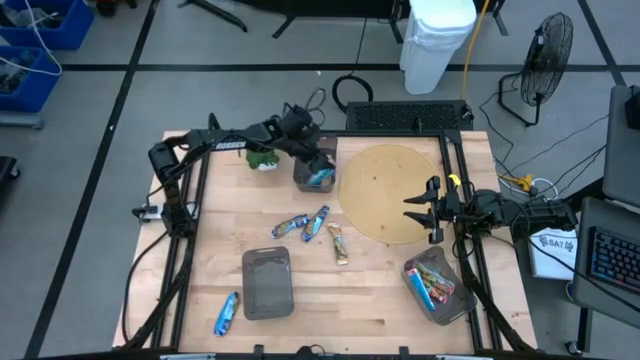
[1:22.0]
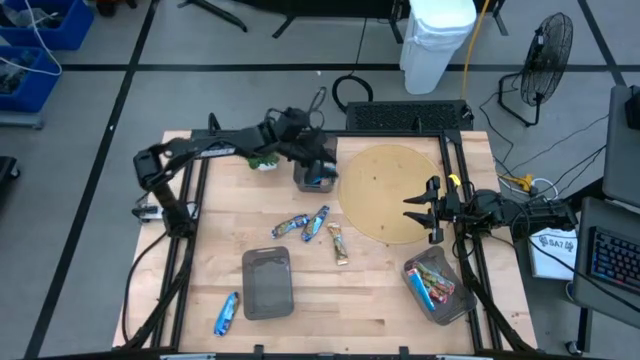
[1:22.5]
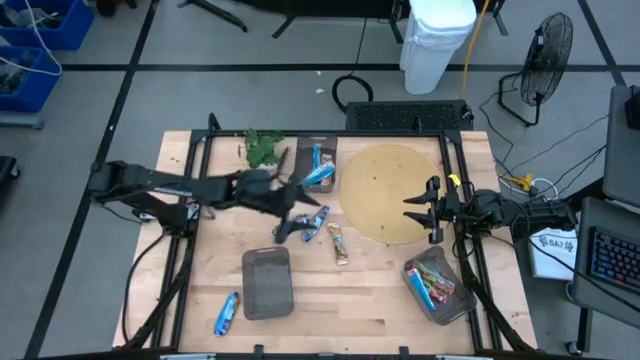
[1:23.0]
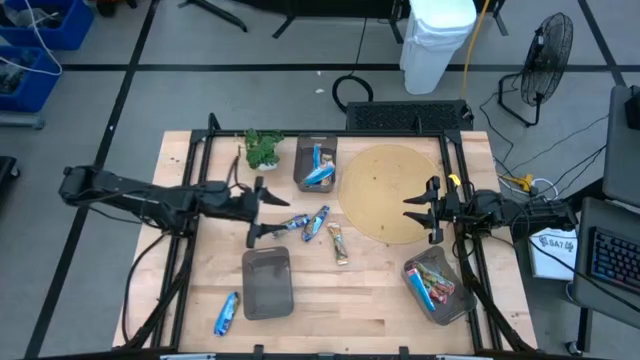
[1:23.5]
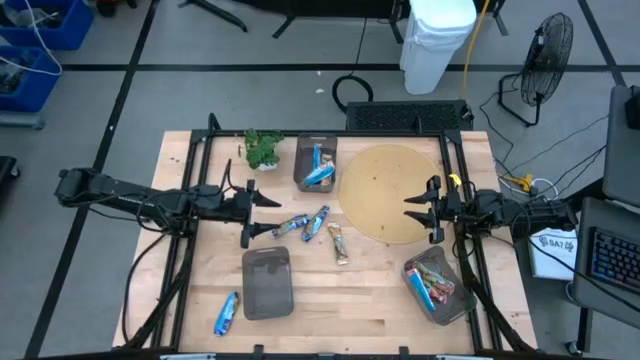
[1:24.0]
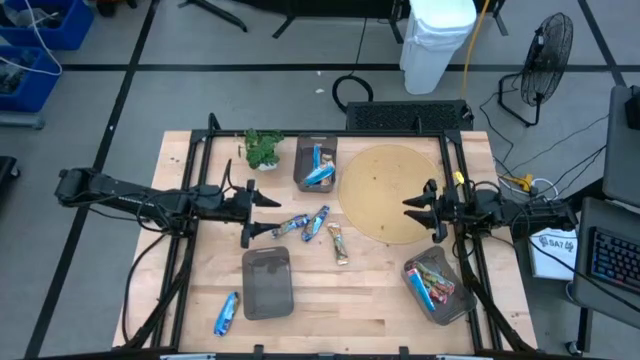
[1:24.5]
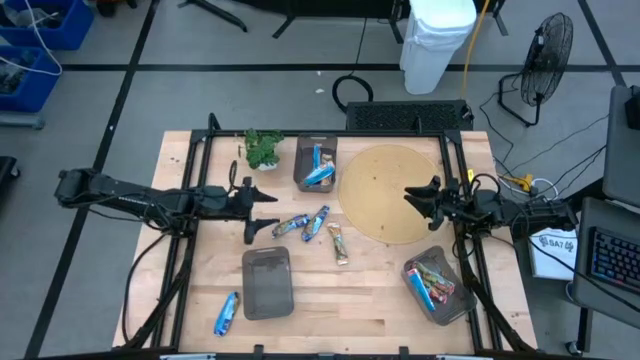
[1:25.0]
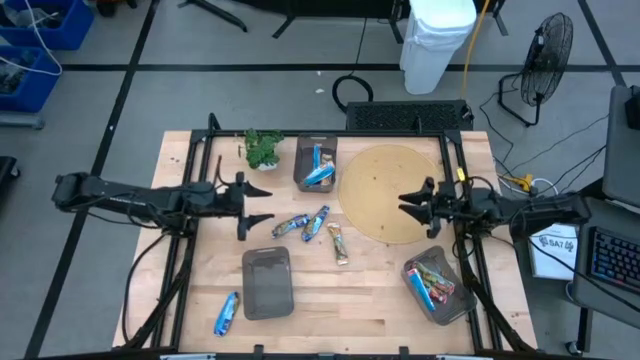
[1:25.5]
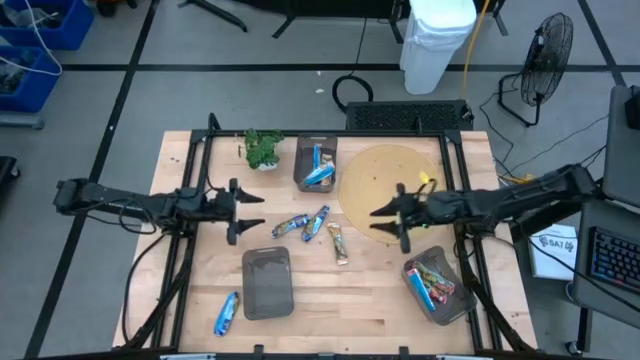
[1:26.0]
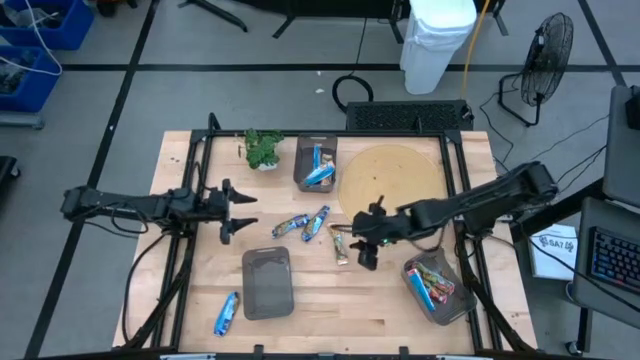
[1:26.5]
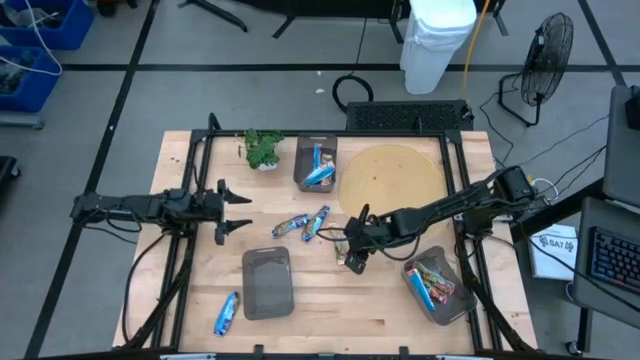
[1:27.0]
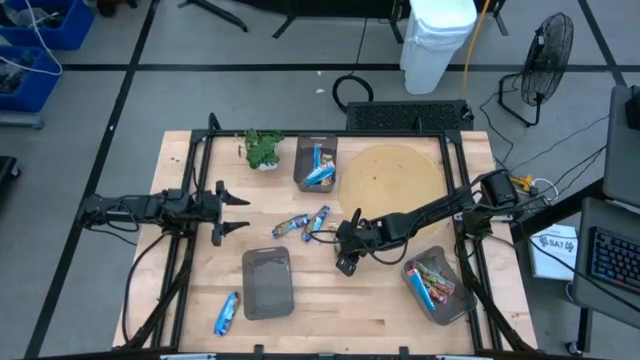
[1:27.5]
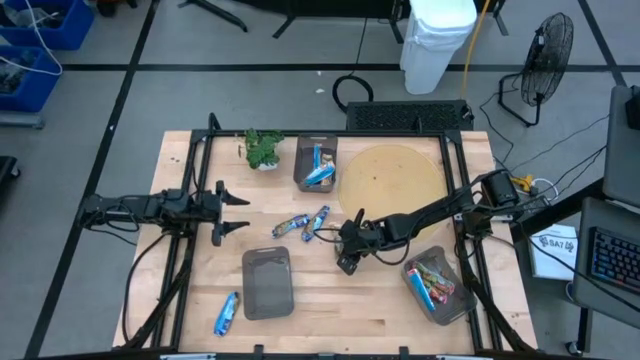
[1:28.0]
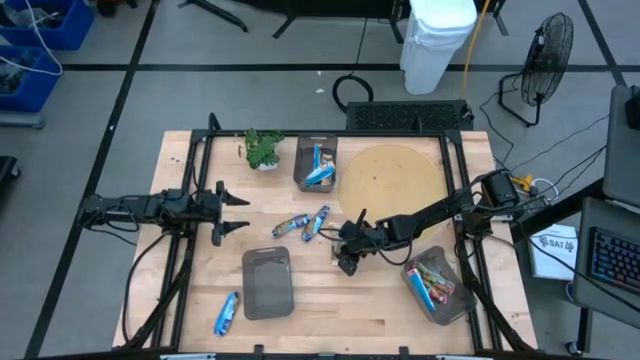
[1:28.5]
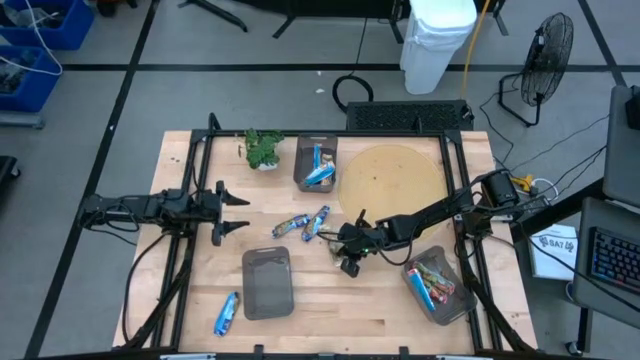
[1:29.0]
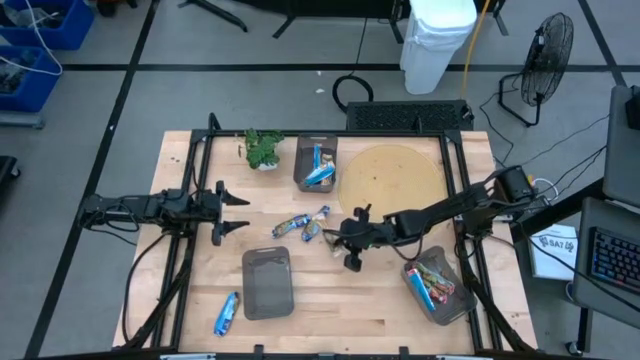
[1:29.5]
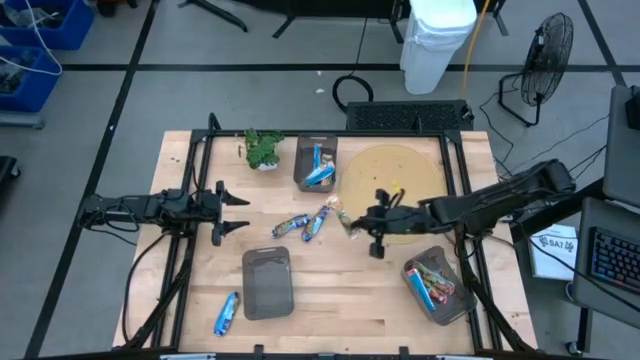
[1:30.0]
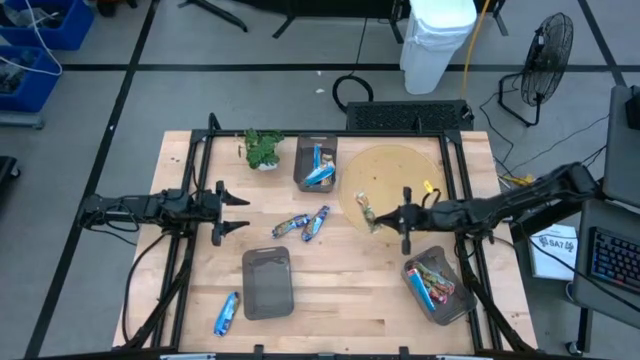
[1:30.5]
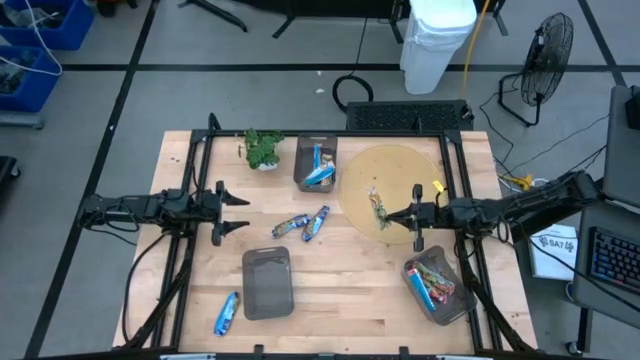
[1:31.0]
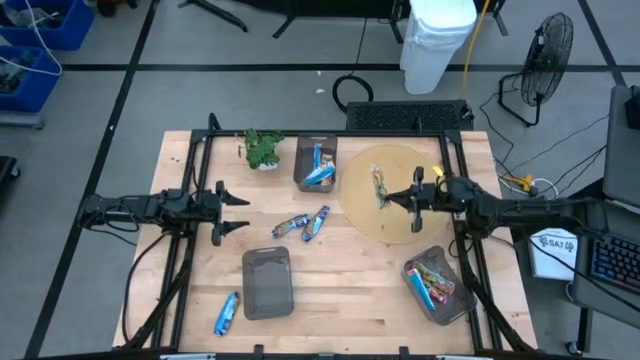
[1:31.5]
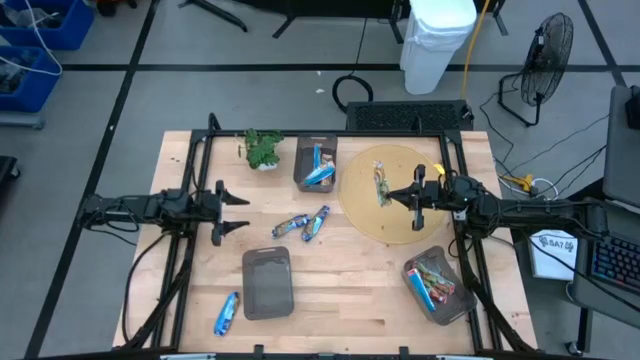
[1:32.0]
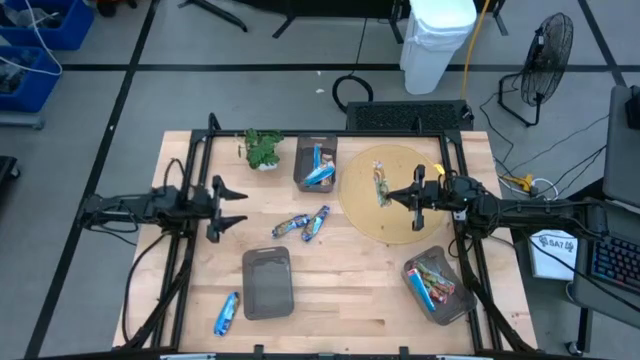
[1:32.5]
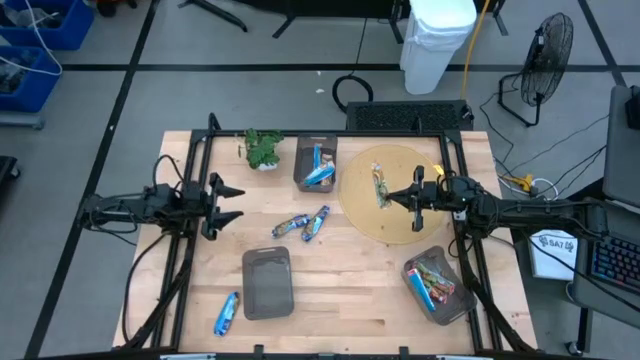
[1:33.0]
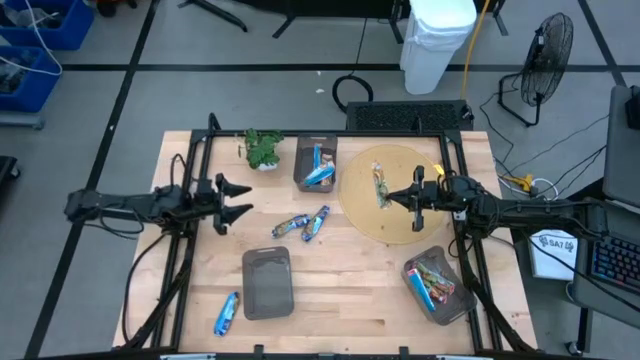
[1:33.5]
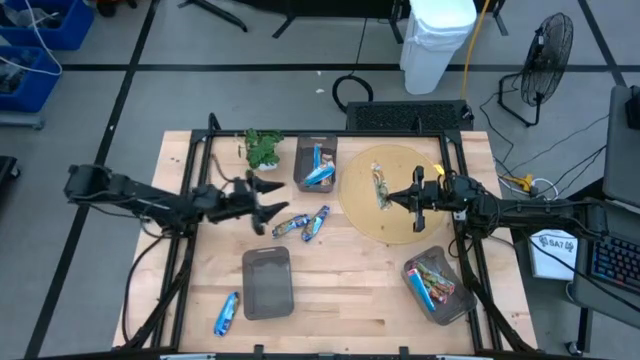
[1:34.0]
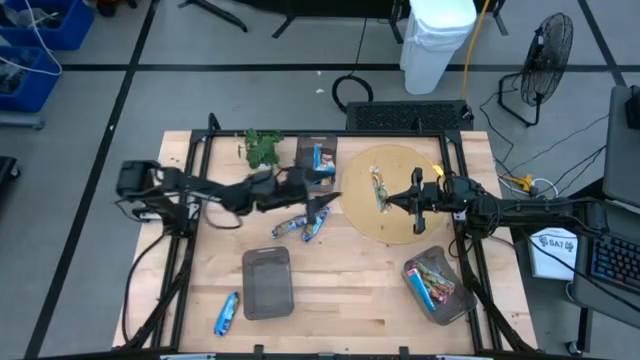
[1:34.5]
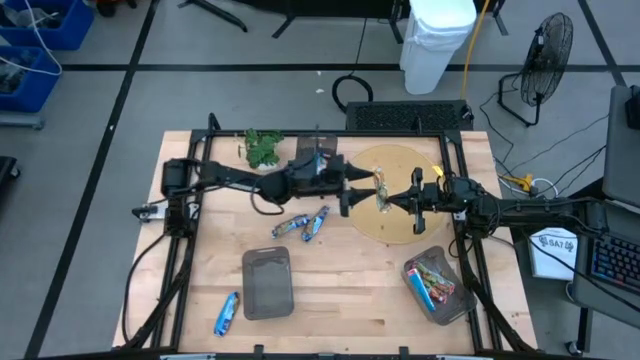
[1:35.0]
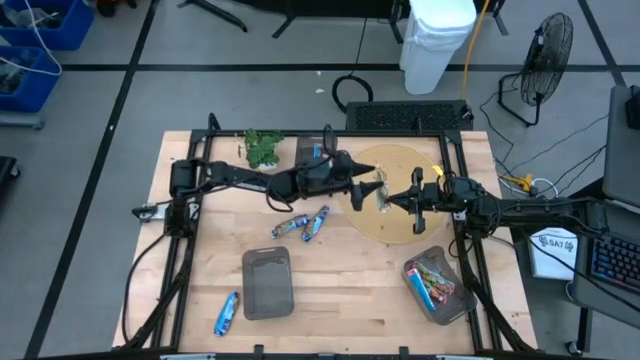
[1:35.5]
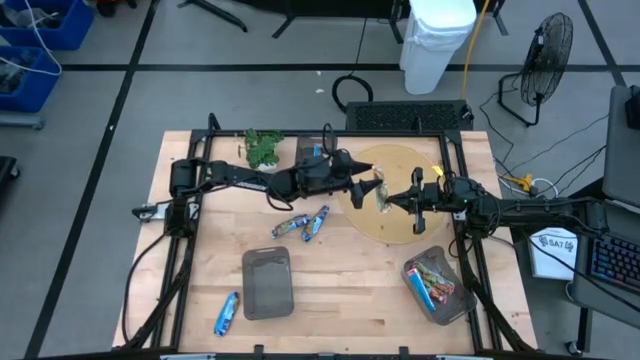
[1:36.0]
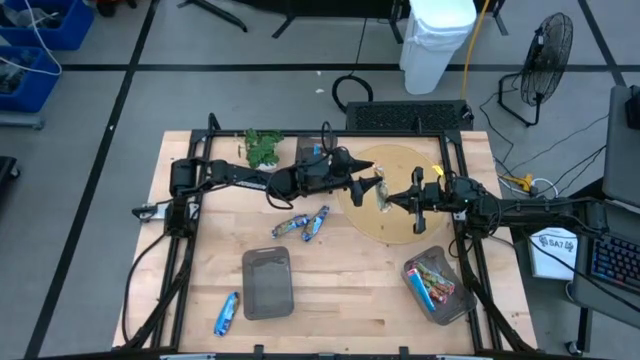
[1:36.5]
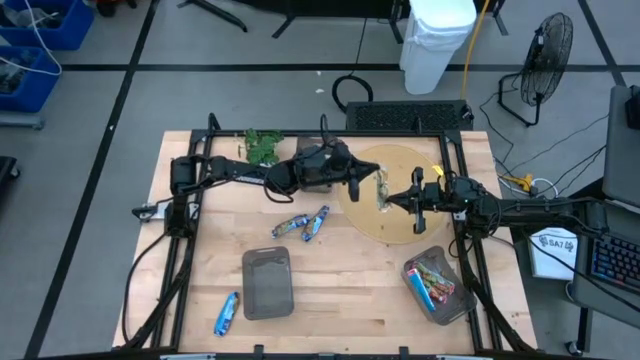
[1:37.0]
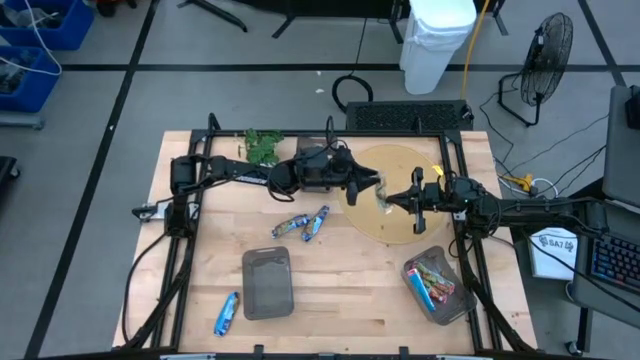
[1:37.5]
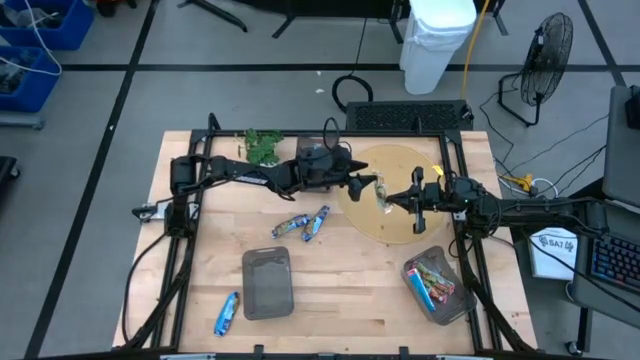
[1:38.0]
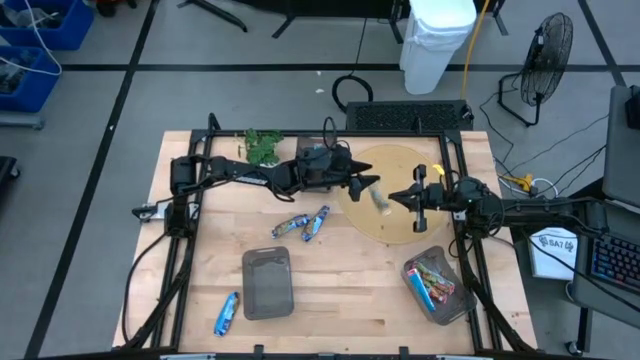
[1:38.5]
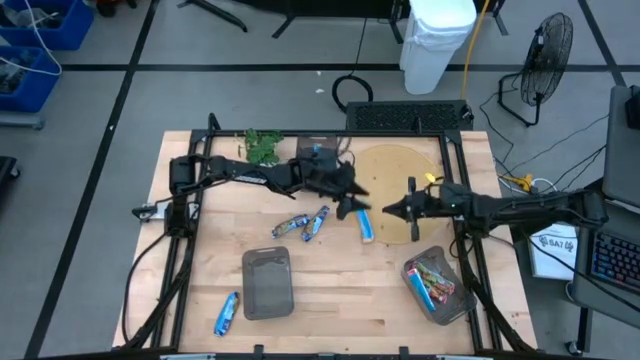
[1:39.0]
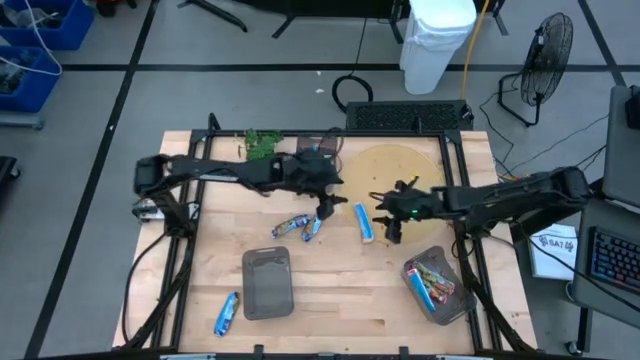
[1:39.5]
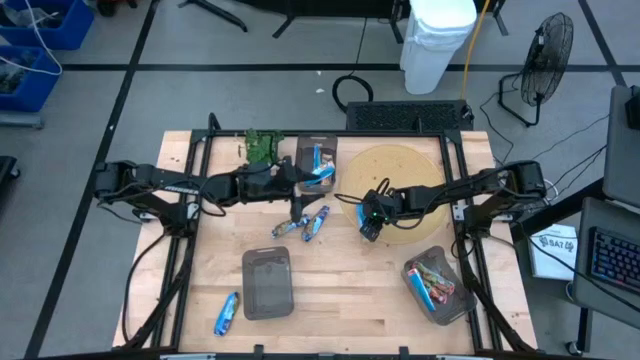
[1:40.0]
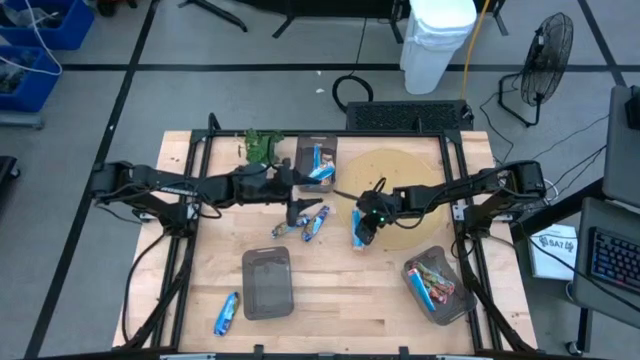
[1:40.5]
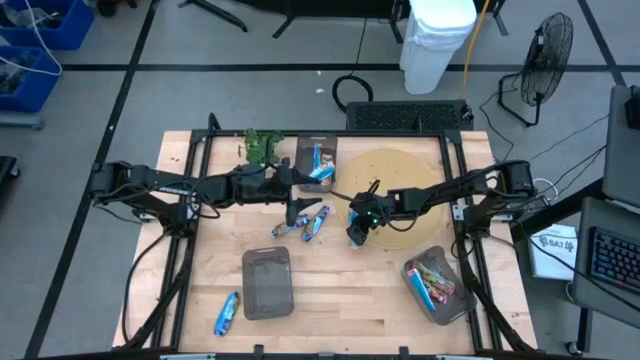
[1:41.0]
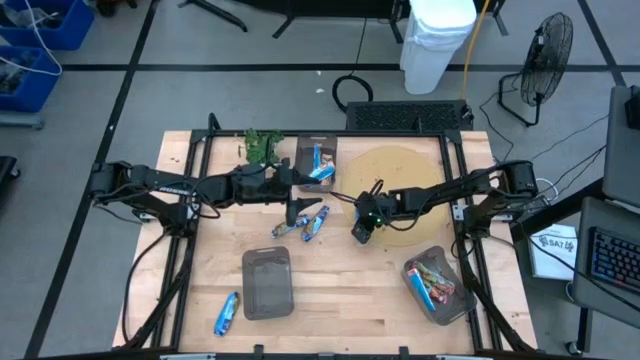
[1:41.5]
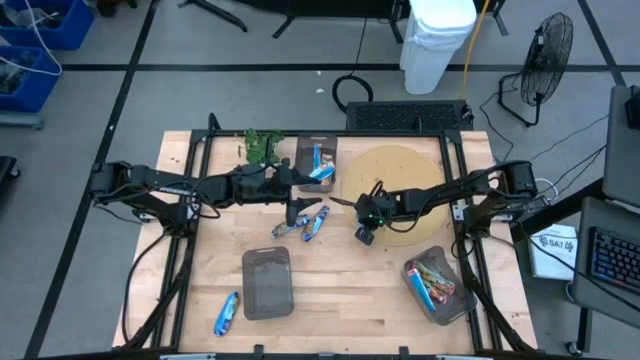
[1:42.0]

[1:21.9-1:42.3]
Task: Pick and place Granola Bars by type
Put the yellow granola bar into the top black bin

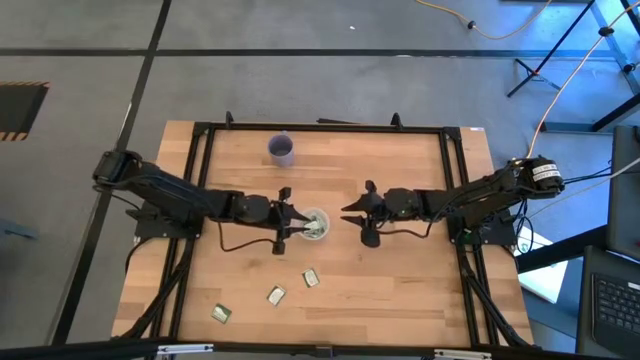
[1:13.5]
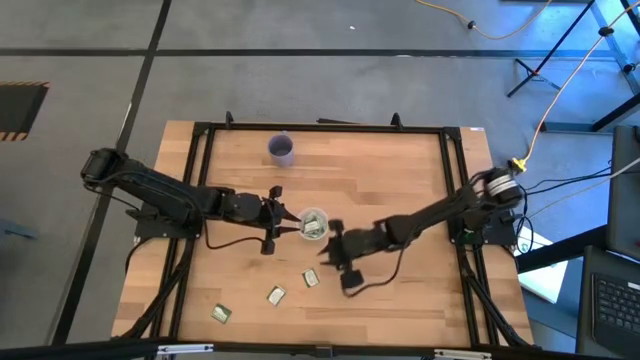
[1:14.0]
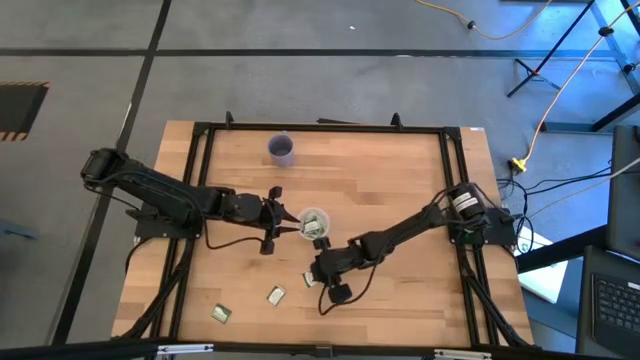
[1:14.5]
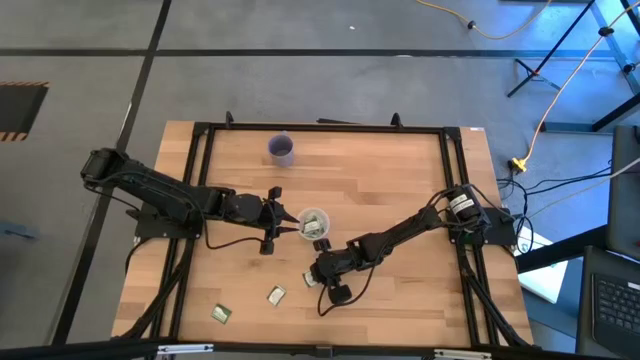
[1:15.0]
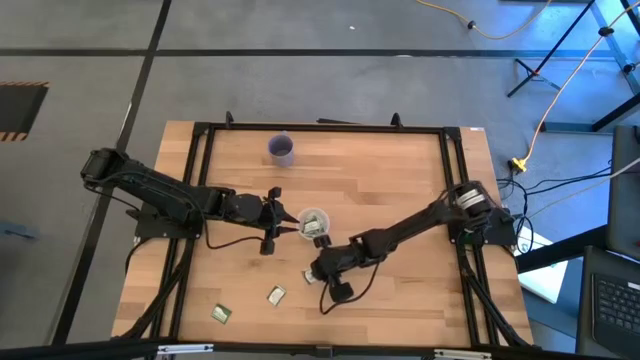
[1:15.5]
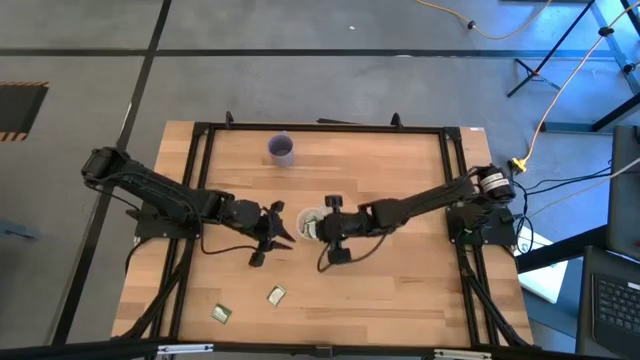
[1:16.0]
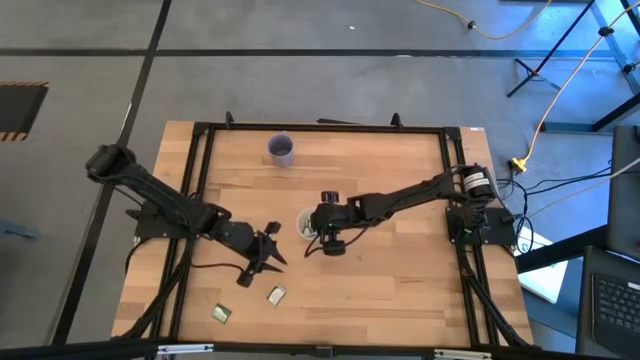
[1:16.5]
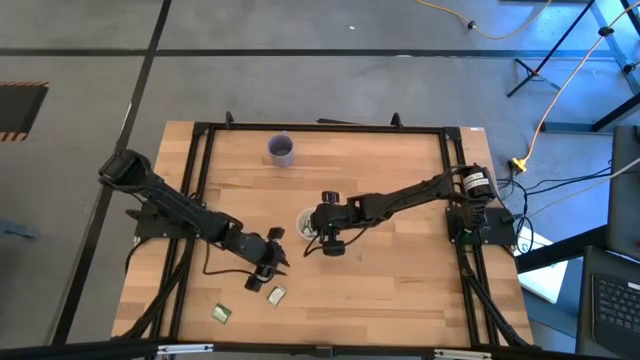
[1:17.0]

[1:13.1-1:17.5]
Task: Pick and place Stevia / Truvia into bins
Put the truvia packet into the transparent container
